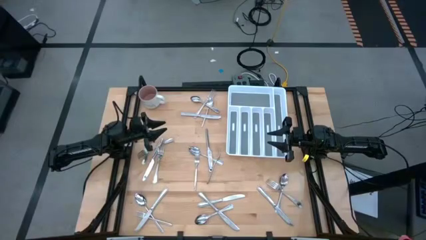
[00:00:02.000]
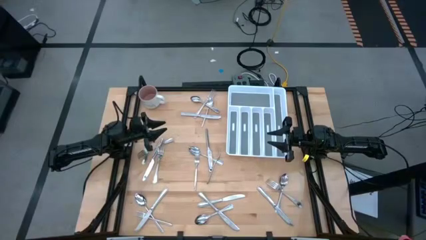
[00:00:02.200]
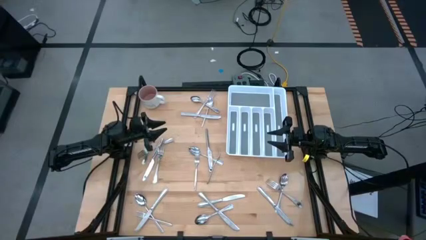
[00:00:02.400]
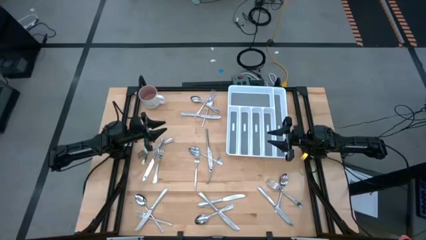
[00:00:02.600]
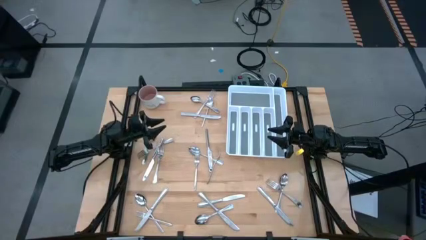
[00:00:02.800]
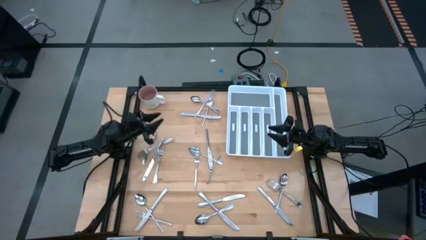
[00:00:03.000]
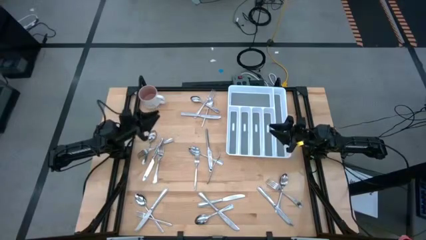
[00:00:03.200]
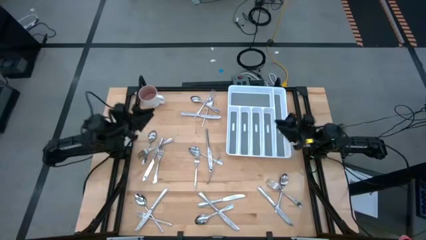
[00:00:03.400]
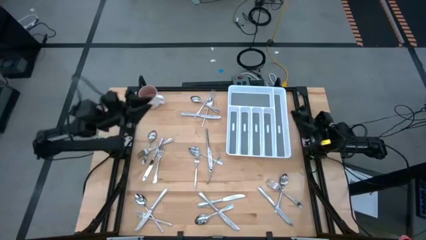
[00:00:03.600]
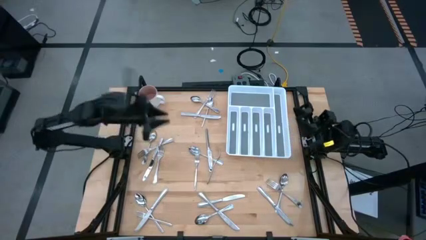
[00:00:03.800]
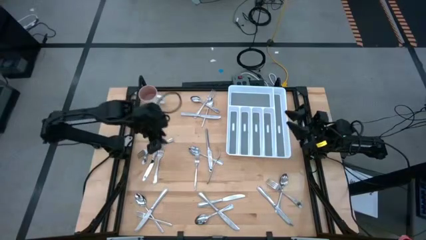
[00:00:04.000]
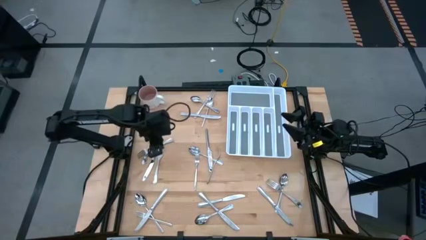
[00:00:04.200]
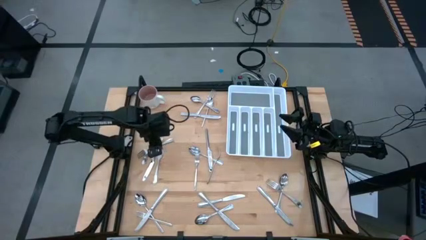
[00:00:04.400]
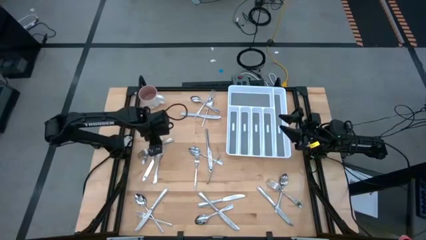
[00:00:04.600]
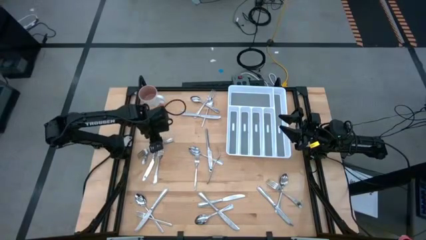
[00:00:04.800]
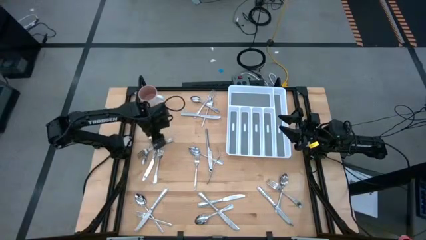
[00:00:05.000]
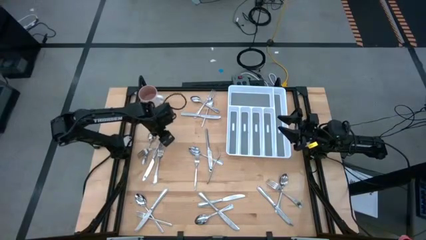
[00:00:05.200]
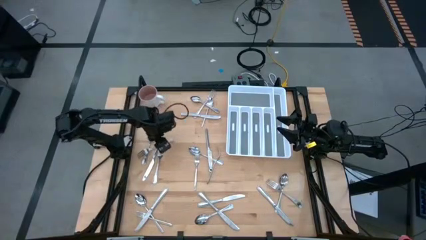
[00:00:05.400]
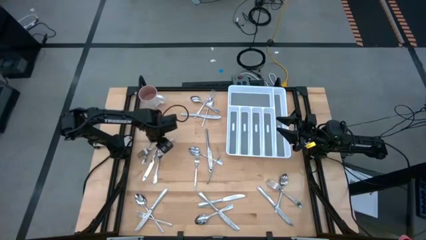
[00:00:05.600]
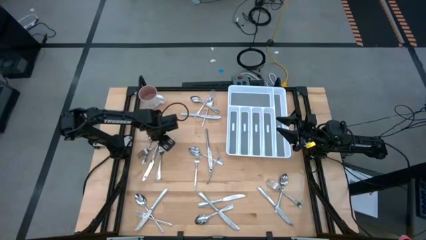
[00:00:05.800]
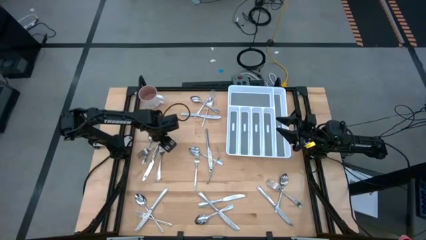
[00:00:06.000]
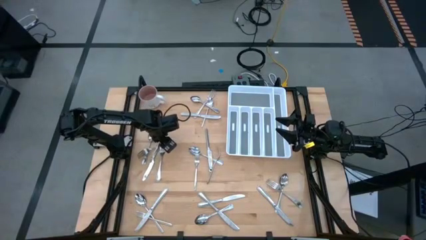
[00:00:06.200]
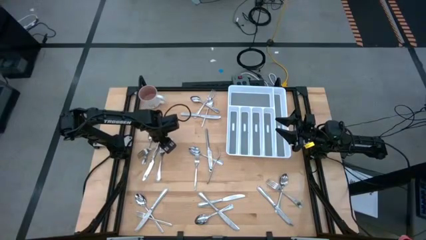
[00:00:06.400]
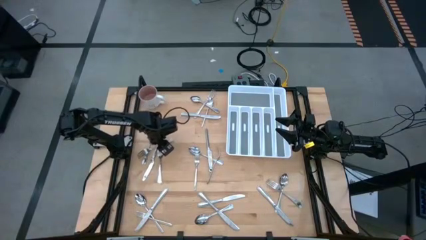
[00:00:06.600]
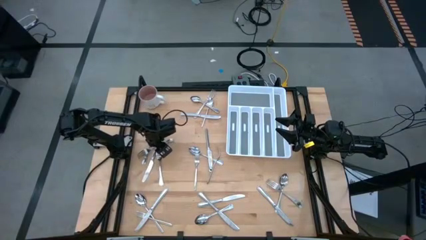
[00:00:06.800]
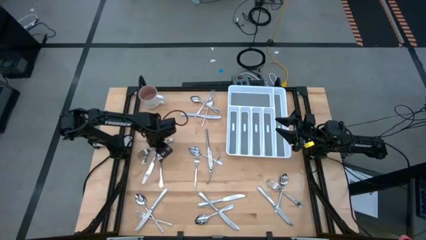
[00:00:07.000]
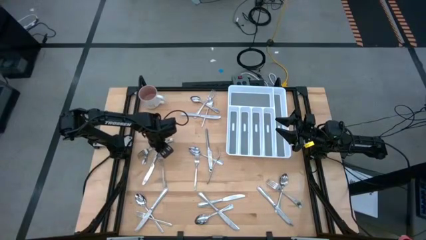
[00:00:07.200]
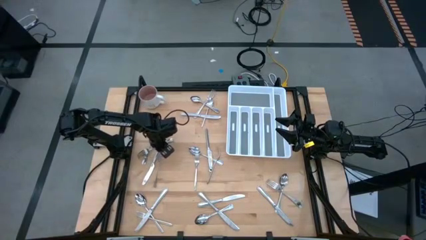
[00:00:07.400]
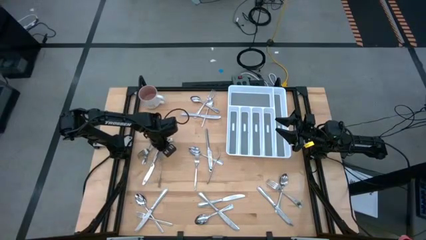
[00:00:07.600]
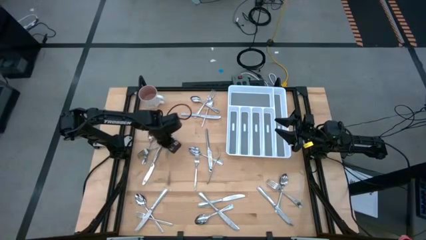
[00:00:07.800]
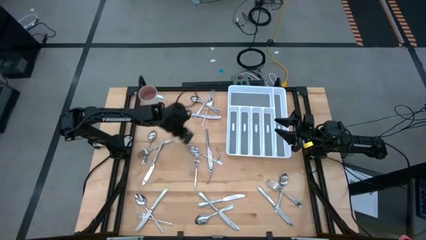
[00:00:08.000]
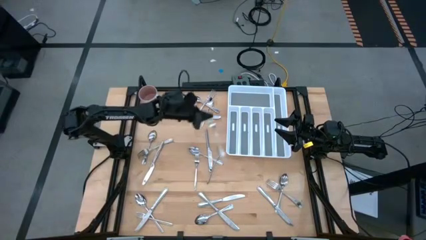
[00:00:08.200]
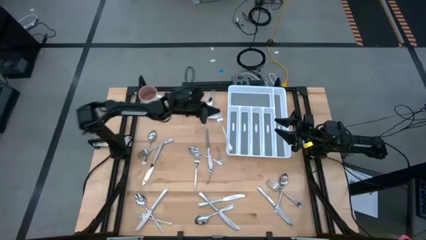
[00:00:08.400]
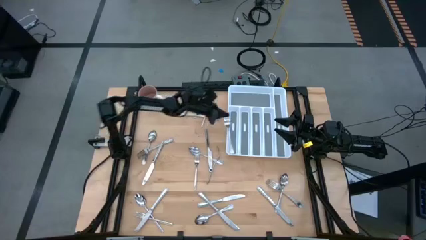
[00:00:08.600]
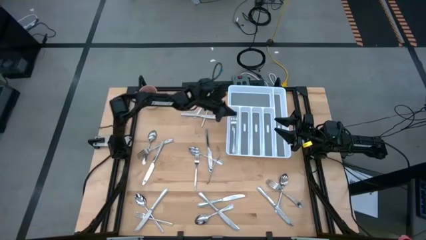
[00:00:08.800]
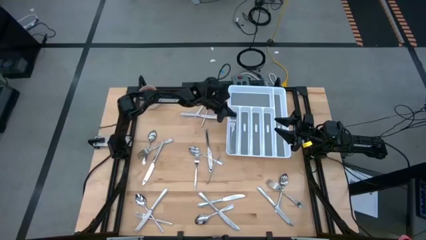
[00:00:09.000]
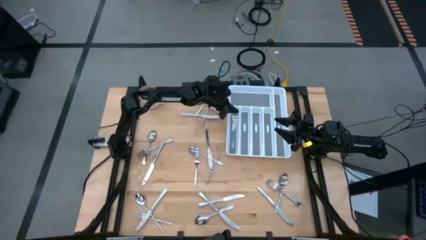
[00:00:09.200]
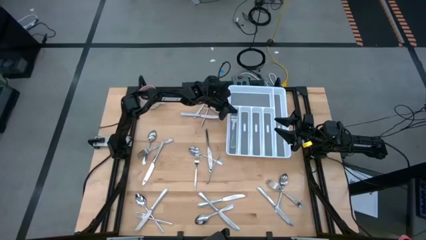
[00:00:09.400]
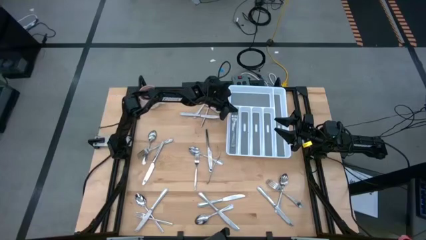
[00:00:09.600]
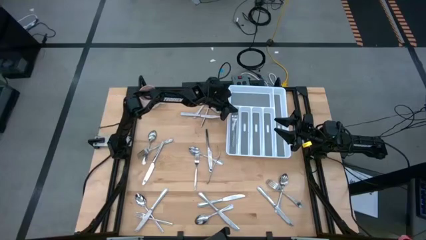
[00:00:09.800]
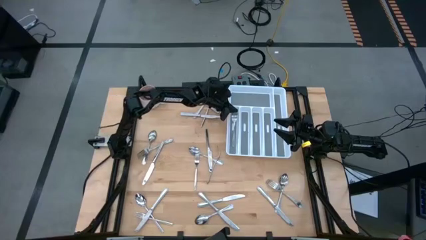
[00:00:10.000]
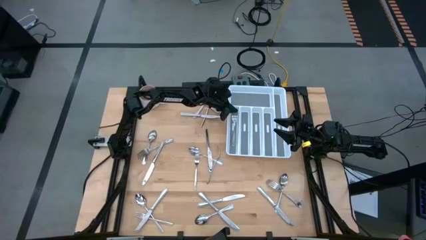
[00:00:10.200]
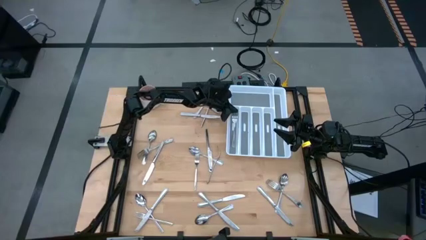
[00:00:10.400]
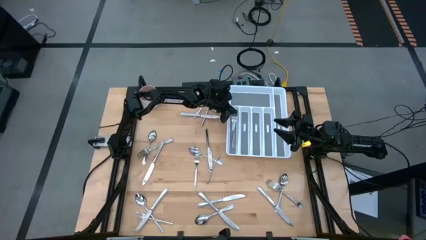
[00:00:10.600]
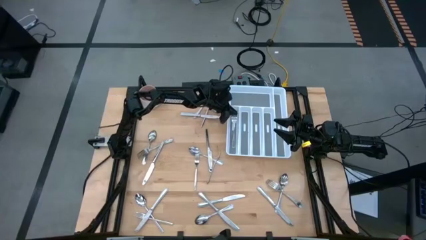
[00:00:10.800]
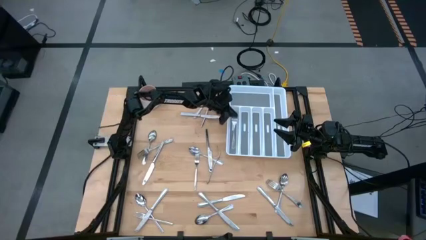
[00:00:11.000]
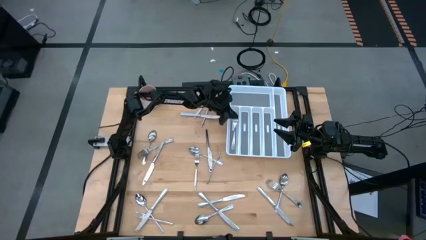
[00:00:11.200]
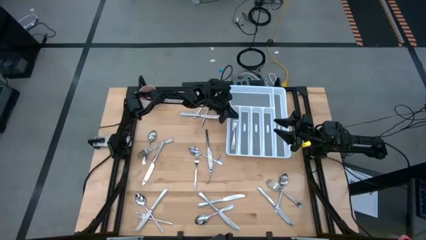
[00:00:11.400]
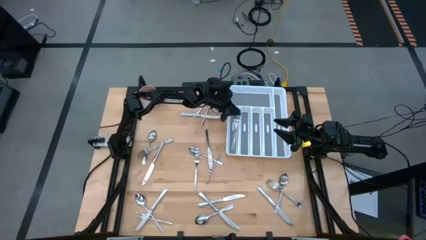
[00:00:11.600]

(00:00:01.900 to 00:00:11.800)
Task: Sort silverware
Put the silver fork into the left slot of the white silverware tray

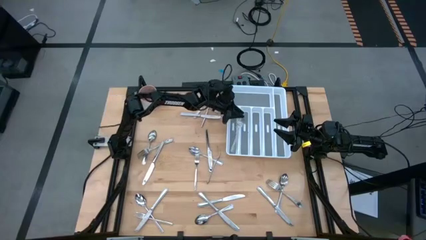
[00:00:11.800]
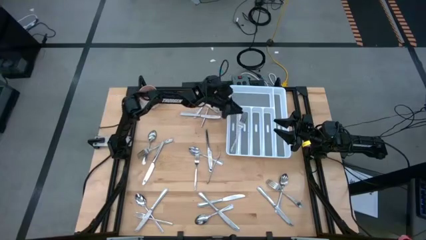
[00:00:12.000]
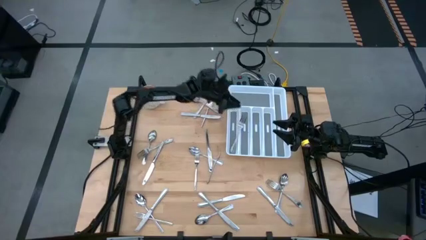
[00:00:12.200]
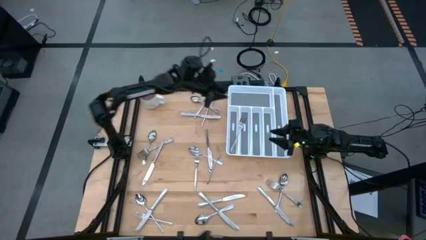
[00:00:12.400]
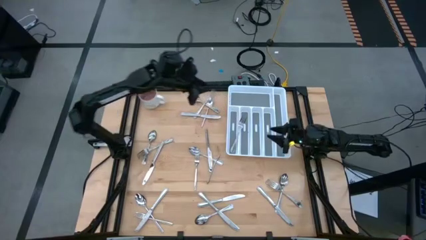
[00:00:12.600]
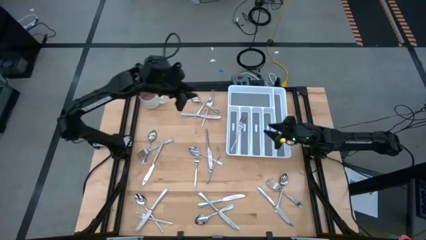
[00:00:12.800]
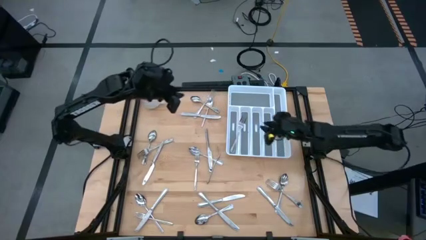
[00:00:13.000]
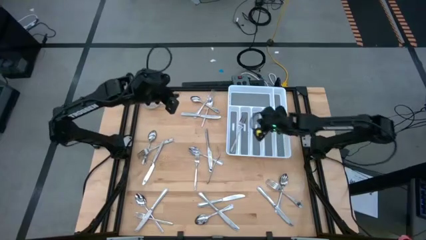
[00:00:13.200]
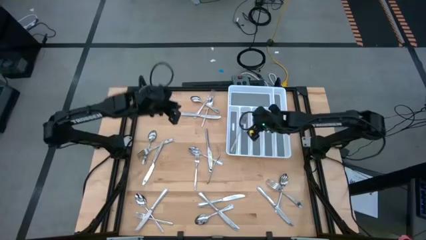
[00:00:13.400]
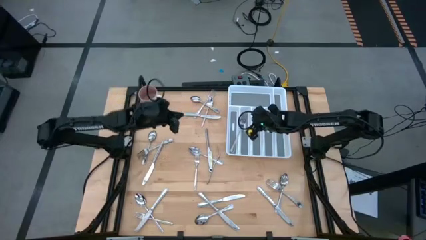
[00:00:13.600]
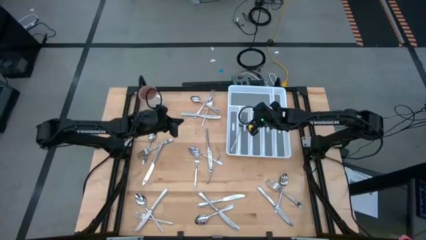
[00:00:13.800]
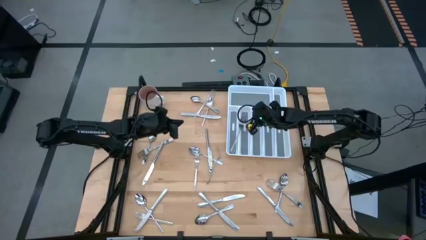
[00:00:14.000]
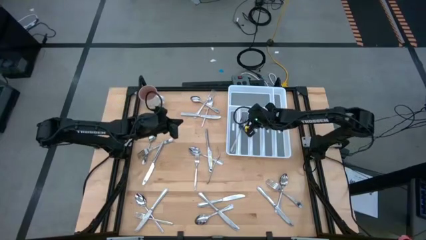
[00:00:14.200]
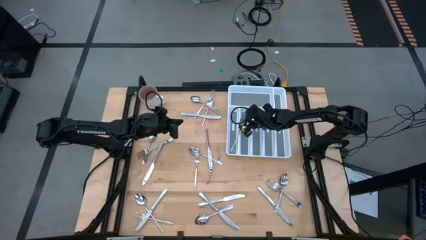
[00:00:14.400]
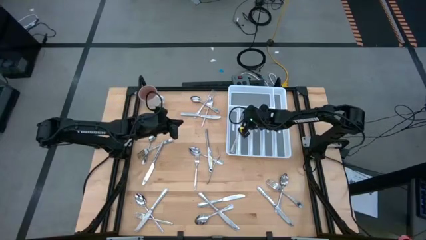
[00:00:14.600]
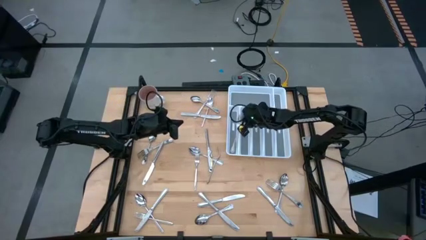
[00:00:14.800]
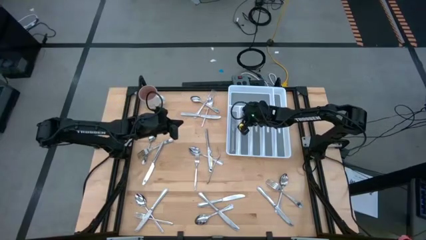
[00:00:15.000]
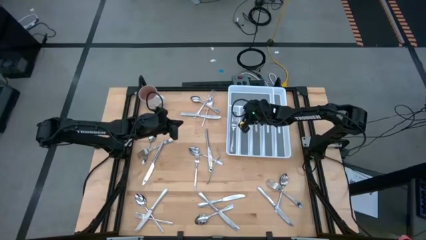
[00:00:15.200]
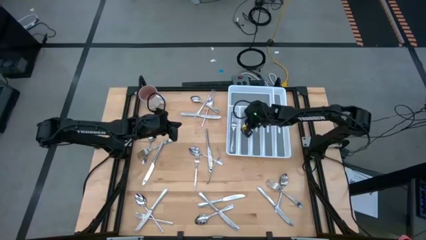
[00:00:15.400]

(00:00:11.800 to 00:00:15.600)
Adjust the silver fork in the left slot of the white silverware tray
